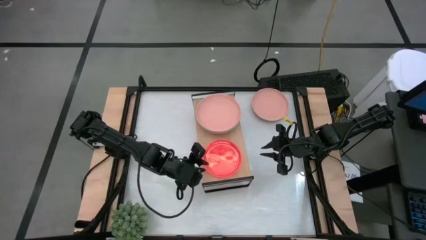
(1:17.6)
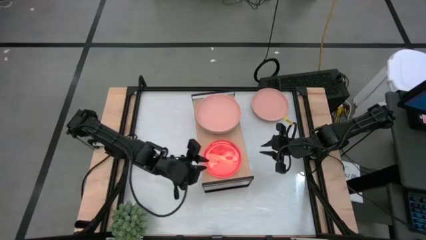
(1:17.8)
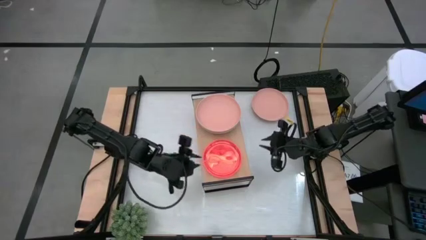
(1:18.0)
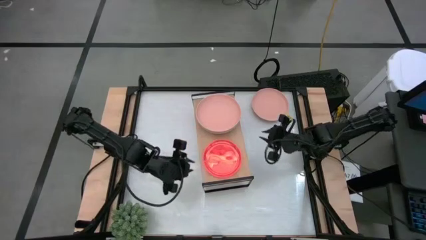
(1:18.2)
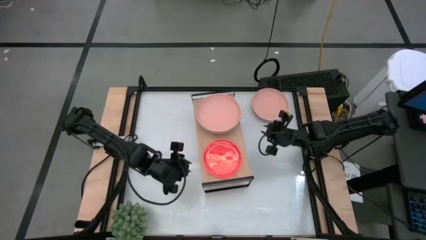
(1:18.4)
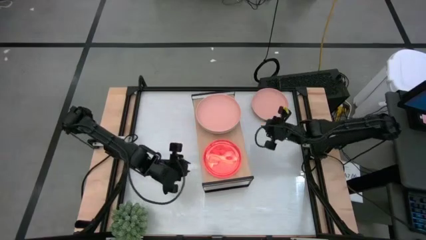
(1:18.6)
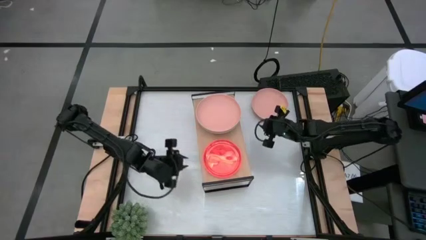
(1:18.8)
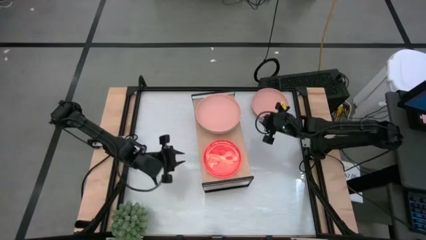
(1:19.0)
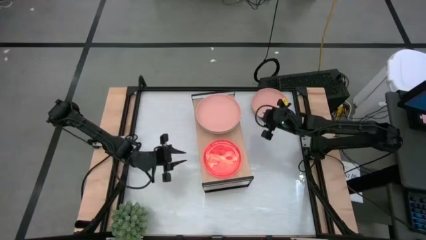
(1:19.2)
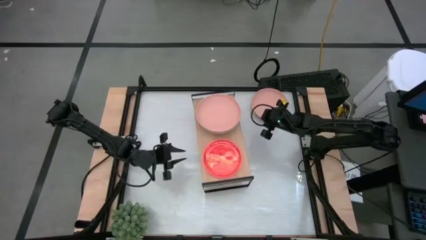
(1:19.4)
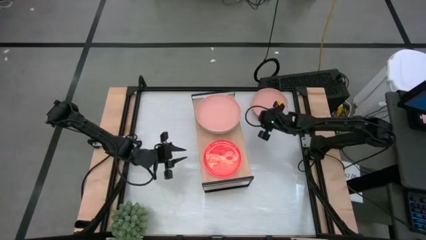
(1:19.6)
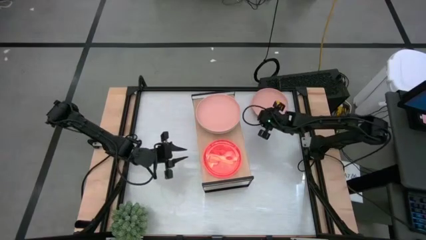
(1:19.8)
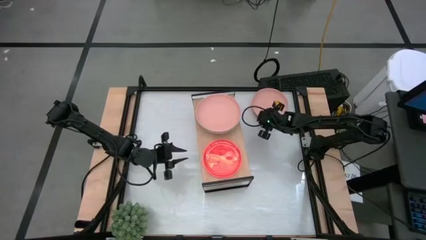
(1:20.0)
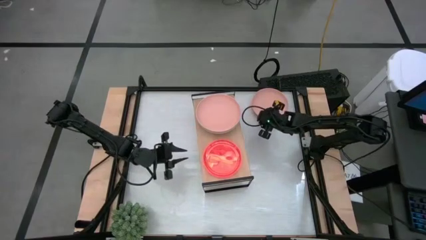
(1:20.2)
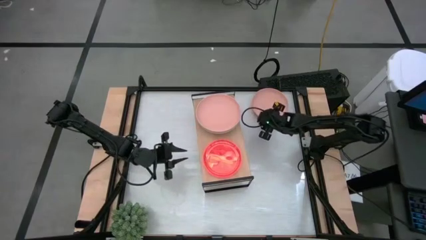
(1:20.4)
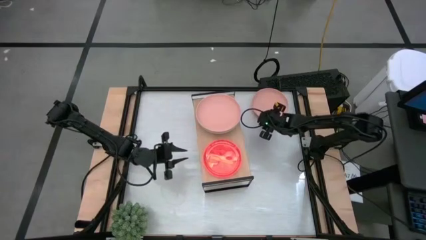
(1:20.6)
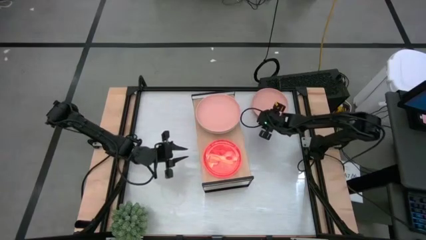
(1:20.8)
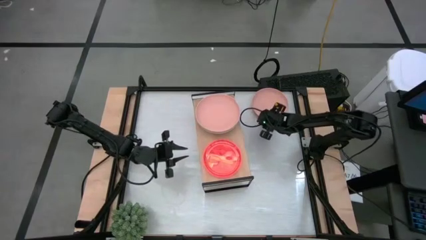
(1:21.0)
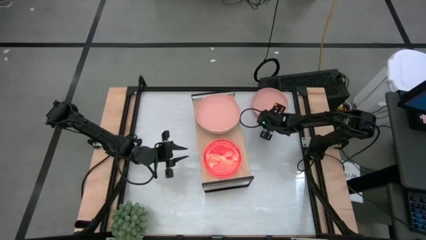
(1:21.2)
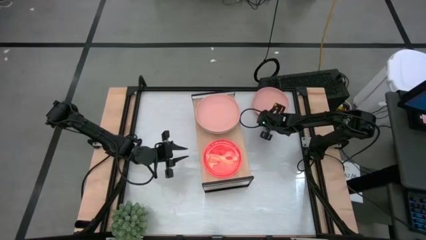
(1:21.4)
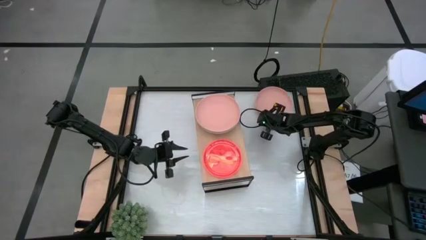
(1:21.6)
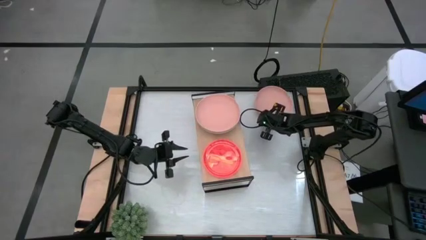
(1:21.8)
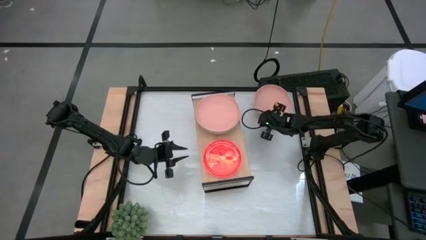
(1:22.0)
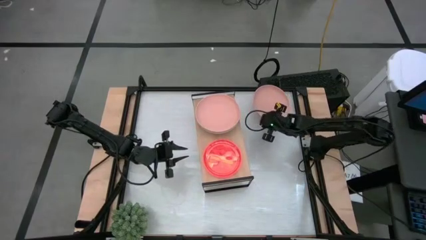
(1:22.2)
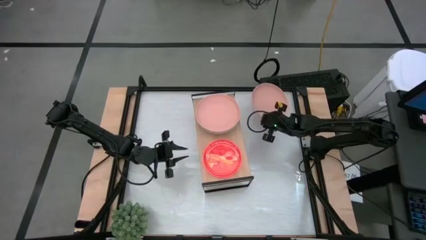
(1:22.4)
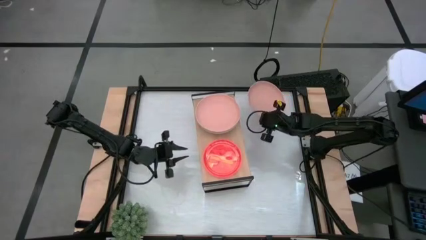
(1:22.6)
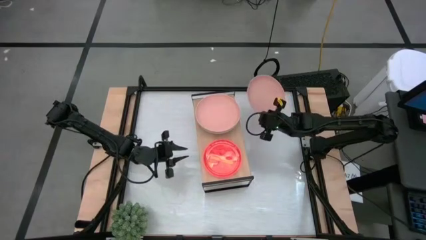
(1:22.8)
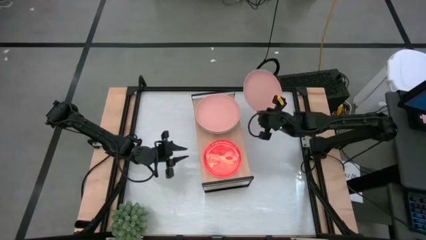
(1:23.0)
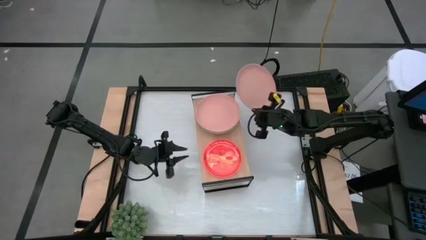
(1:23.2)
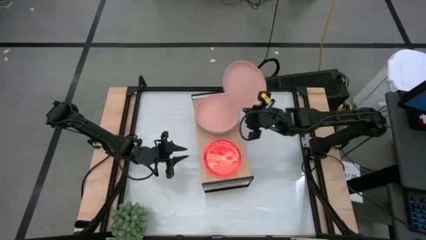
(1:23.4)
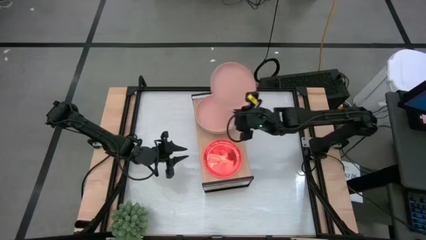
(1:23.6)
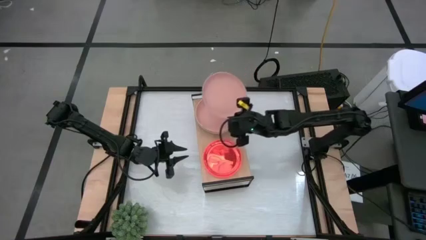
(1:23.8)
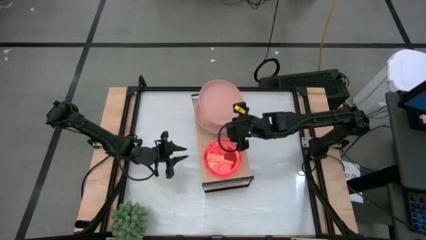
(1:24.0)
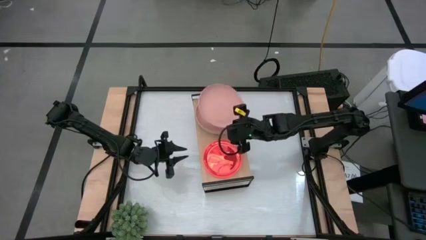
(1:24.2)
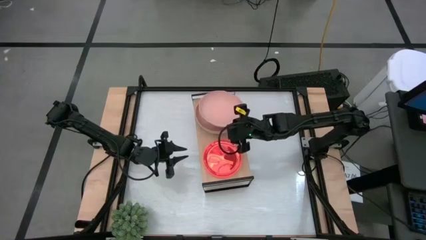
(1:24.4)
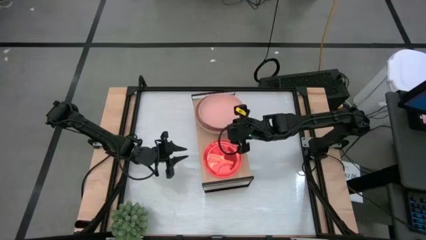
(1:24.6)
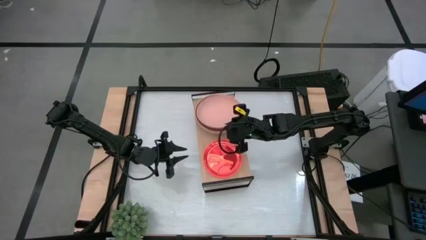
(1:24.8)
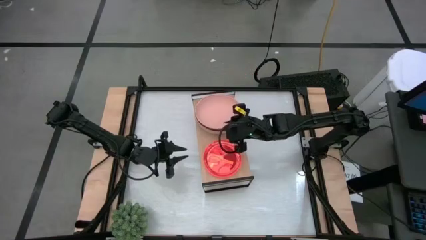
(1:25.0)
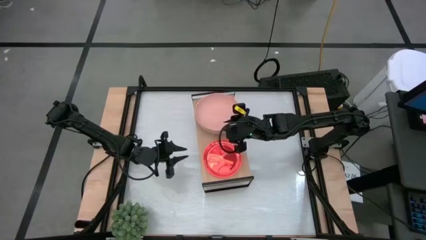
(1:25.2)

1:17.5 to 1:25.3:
Task: Place and stack plates onto a shelf
Stack the dark pink plate on the dark pink plate on the shelf

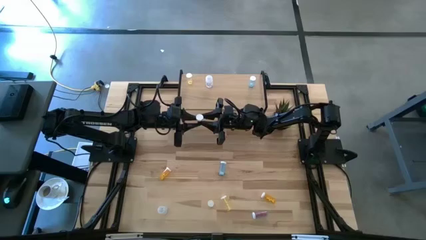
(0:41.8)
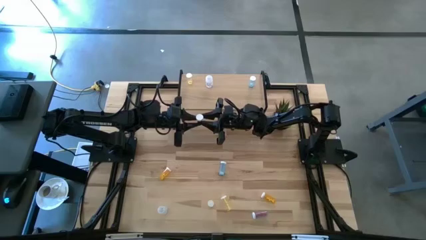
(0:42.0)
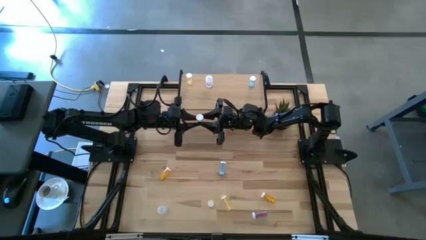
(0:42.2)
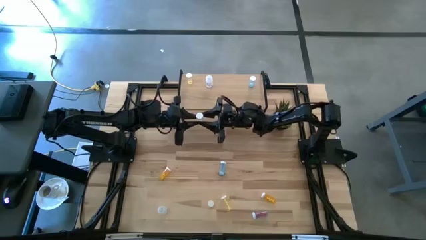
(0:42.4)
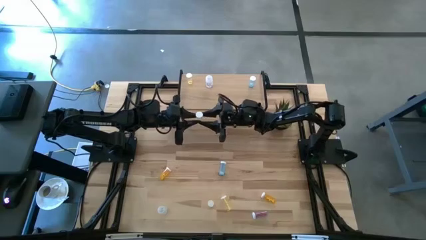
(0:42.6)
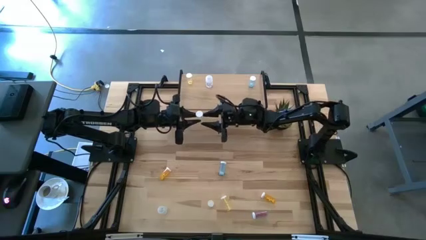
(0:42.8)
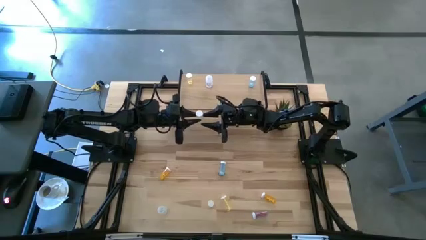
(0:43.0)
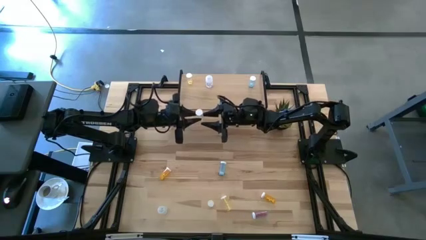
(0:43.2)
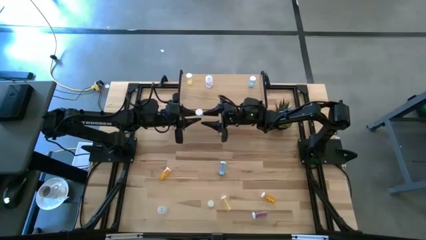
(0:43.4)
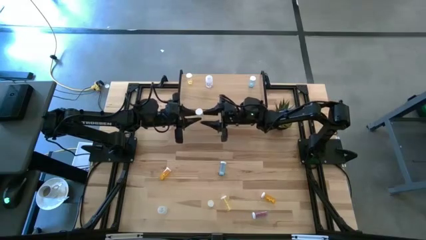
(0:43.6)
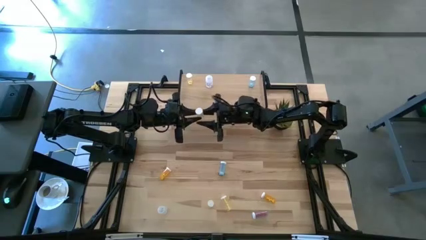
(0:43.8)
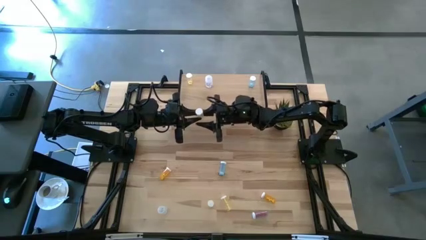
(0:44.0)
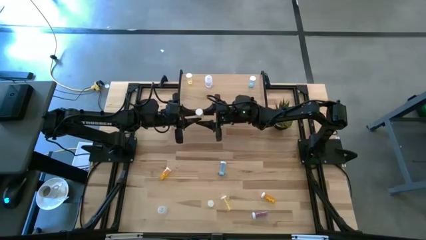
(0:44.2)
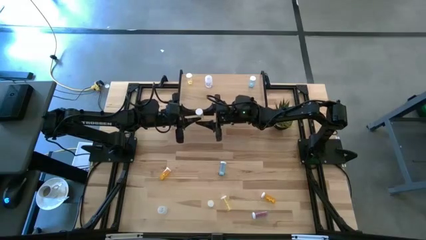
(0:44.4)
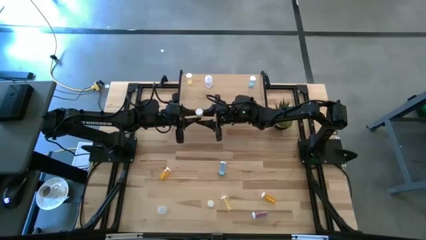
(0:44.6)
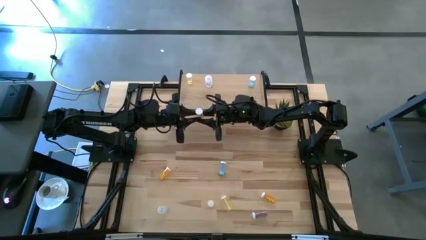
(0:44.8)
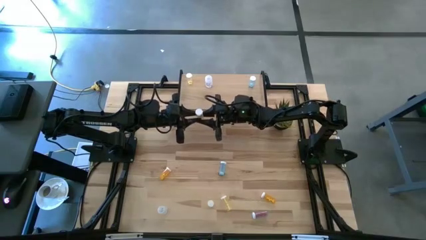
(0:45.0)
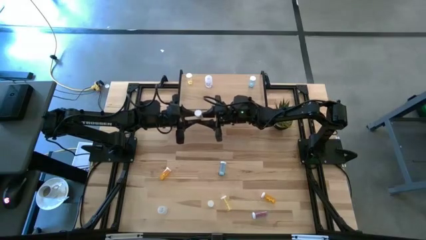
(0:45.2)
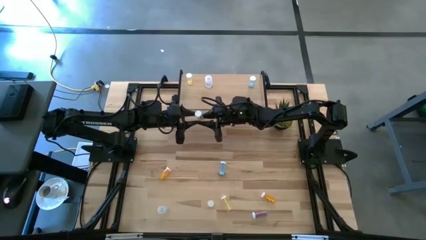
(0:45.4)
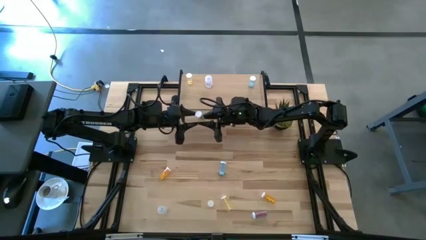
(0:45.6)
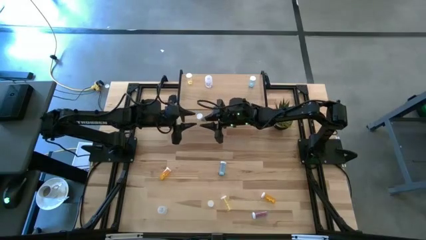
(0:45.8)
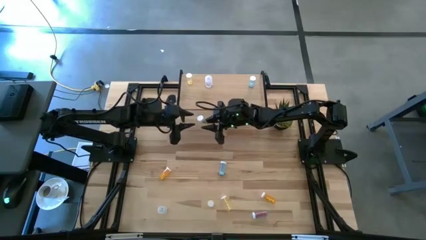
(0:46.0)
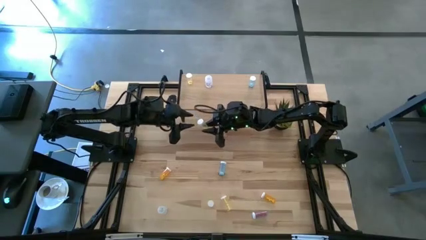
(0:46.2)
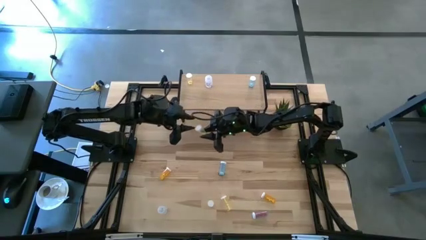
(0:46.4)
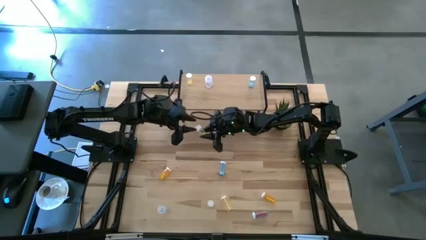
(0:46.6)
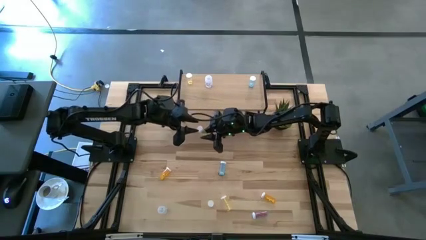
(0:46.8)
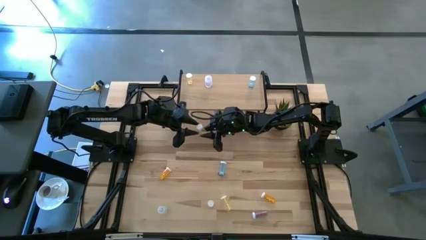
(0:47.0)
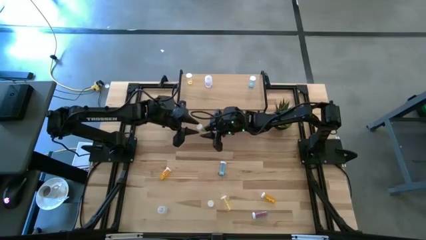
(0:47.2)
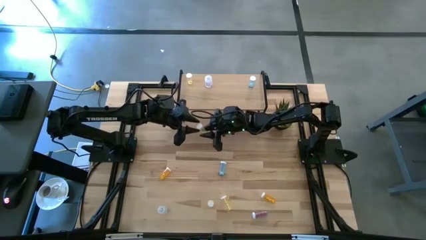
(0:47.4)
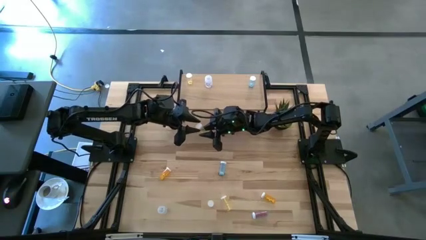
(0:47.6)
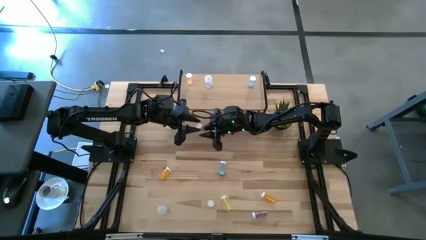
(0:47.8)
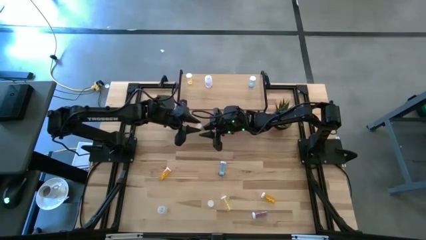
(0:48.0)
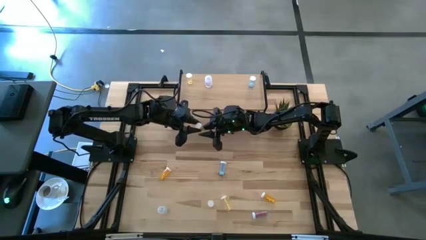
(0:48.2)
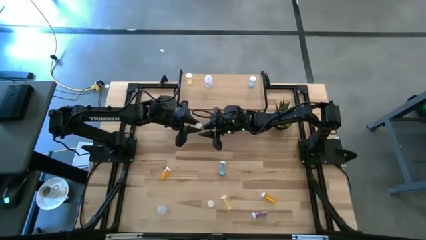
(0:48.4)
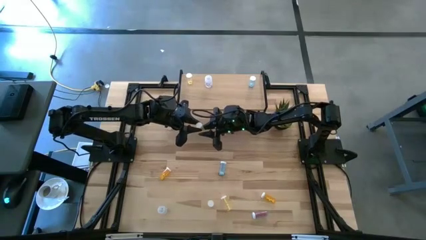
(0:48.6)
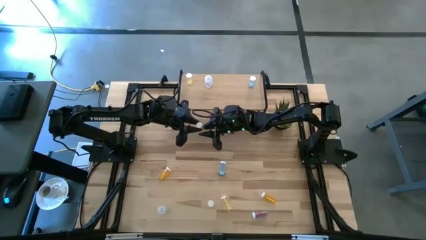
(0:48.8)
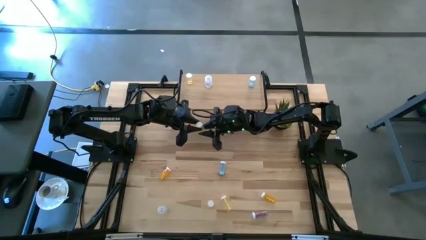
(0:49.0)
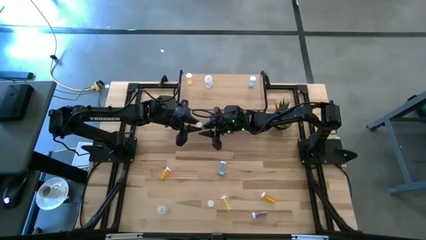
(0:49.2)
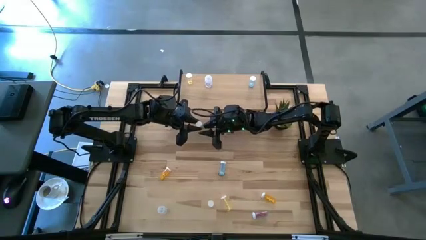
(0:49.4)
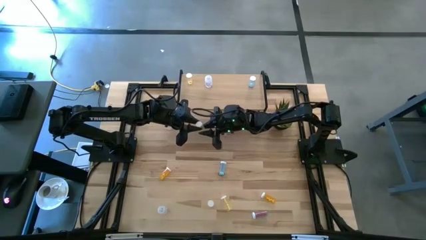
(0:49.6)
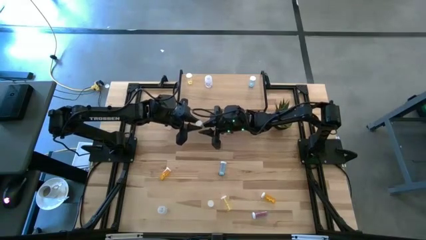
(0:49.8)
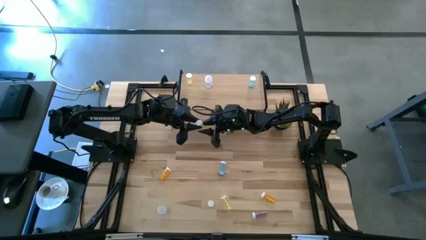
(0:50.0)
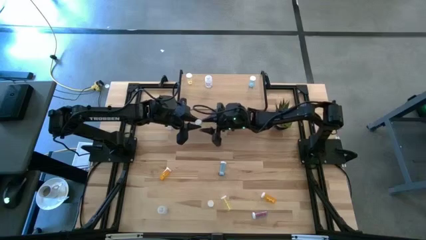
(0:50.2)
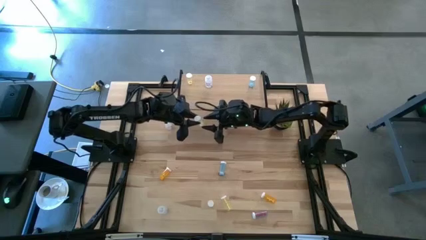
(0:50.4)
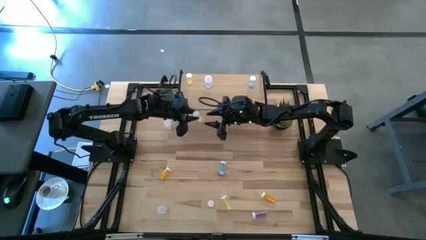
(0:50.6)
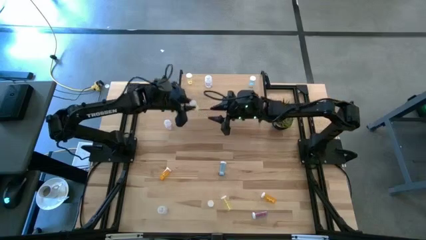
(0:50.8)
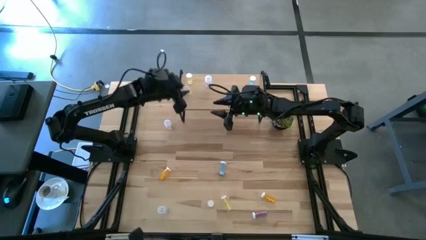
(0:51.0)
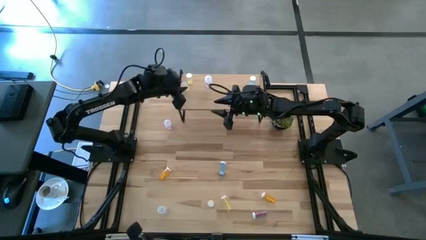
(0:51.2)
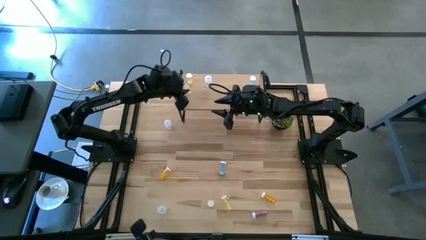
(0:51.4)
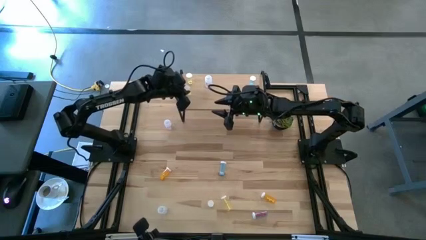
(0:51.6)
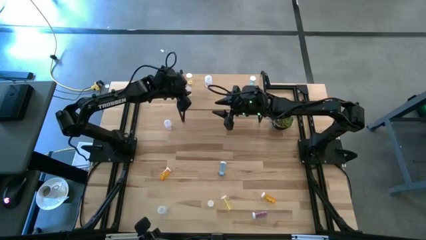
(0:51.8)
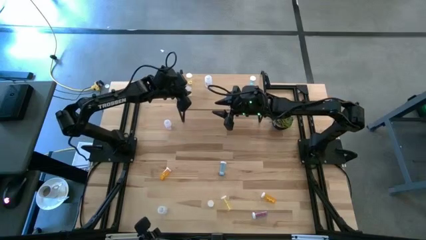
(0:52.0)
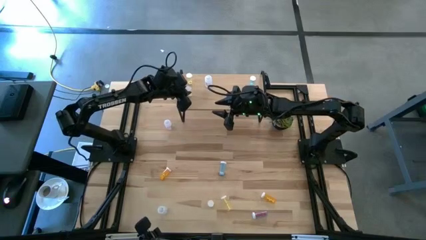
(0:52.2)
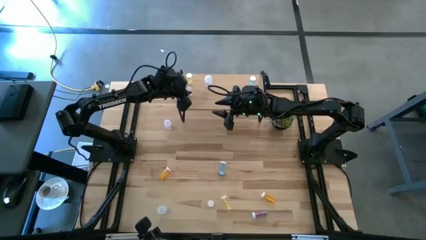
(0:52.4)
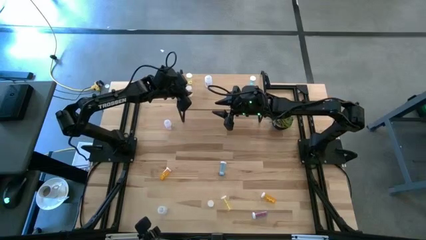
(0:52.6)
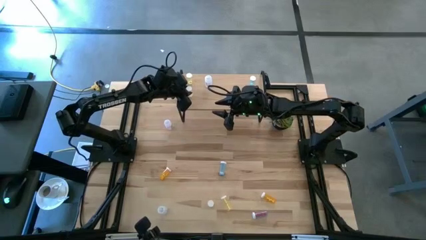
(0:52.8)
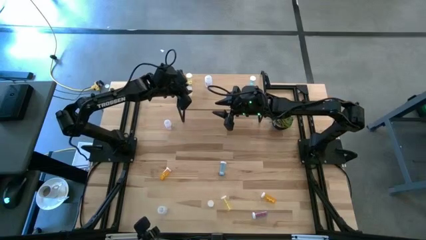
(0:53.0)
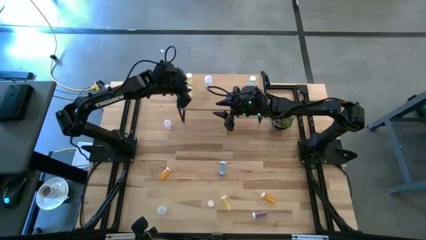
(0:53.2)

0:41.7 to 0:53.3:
Task: Pick and place medicine bottles onto shelf by color
Put the top yellow pill bottle on the shelf aligned with the other yellow pill bottle
